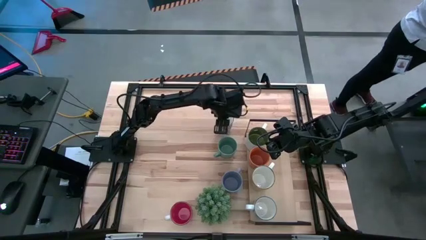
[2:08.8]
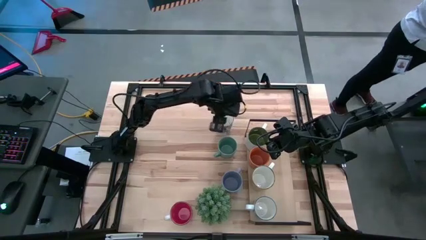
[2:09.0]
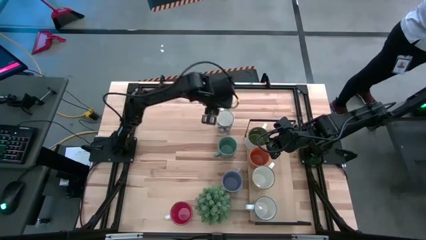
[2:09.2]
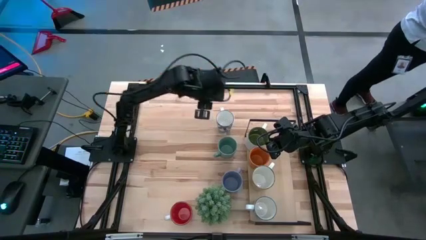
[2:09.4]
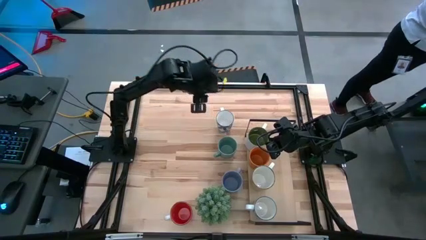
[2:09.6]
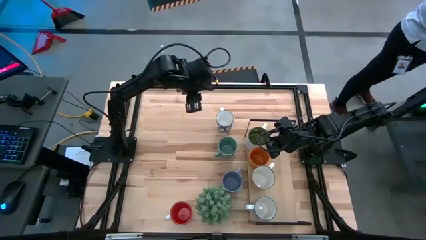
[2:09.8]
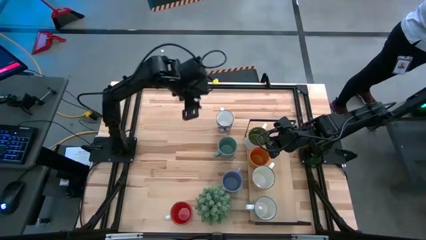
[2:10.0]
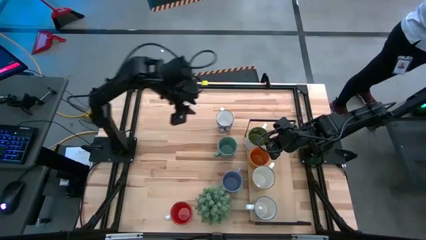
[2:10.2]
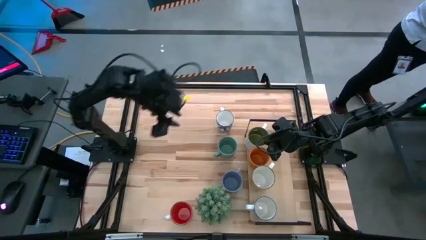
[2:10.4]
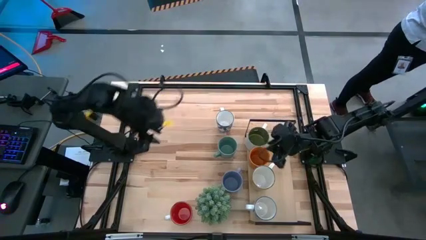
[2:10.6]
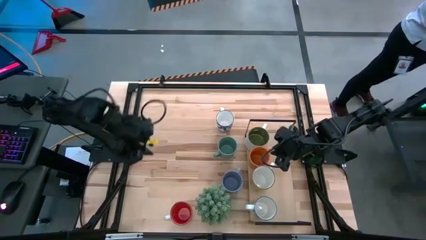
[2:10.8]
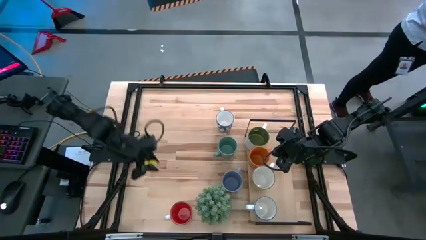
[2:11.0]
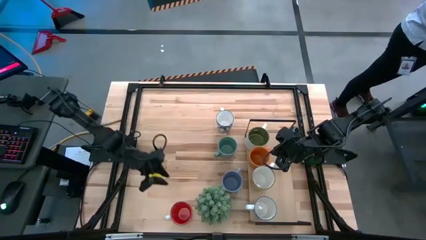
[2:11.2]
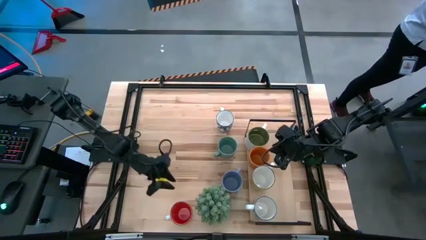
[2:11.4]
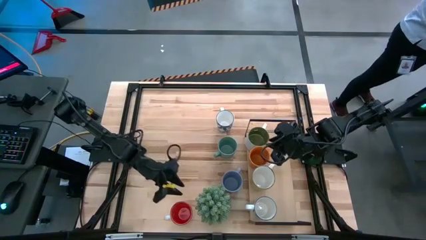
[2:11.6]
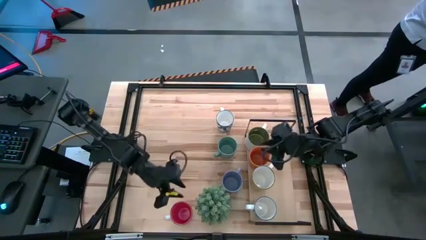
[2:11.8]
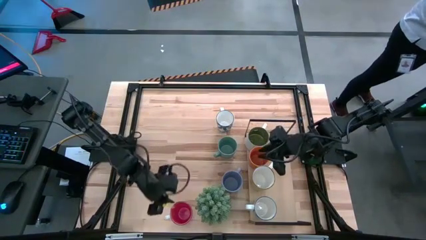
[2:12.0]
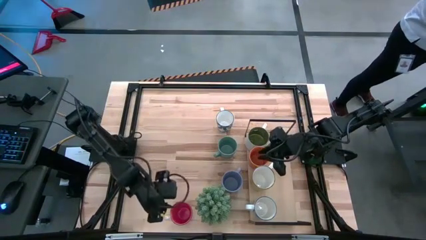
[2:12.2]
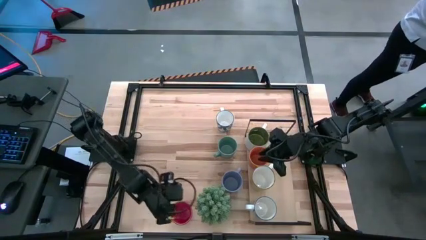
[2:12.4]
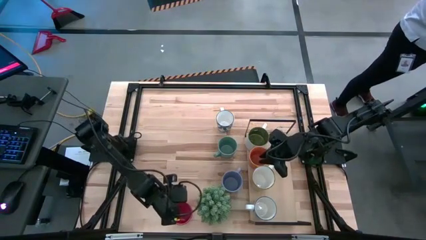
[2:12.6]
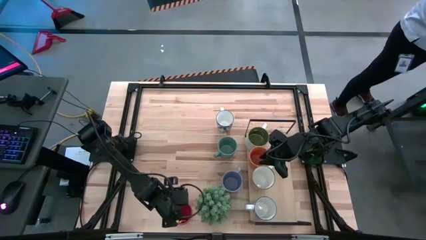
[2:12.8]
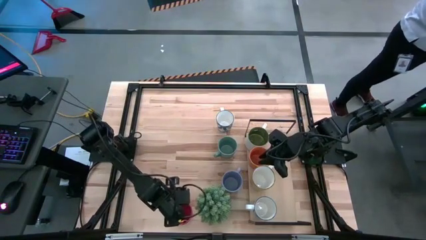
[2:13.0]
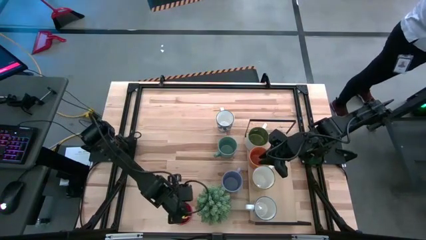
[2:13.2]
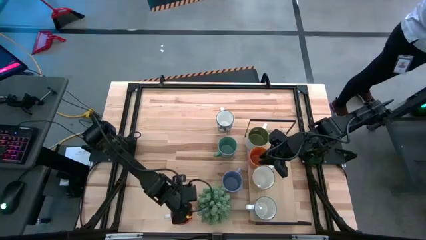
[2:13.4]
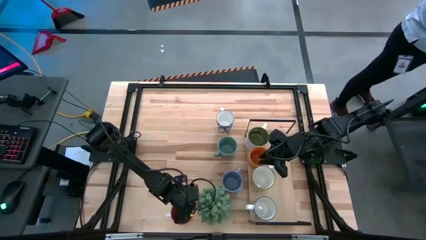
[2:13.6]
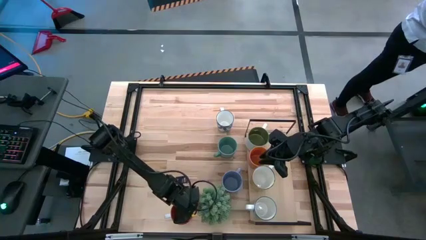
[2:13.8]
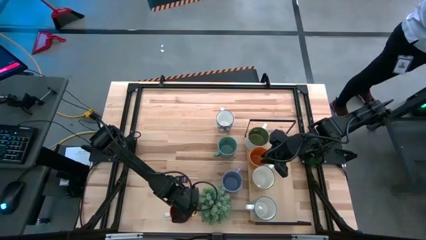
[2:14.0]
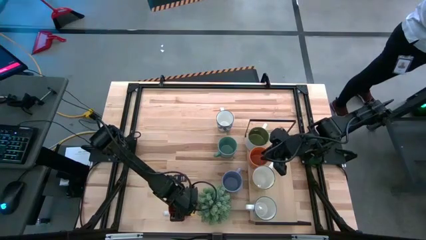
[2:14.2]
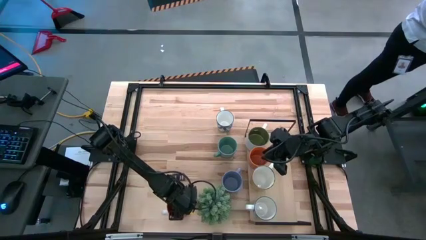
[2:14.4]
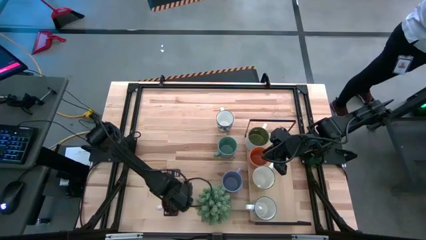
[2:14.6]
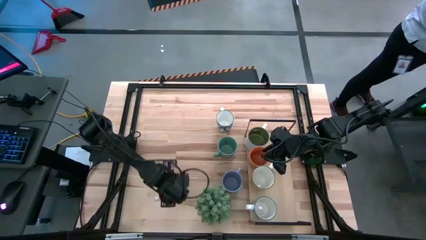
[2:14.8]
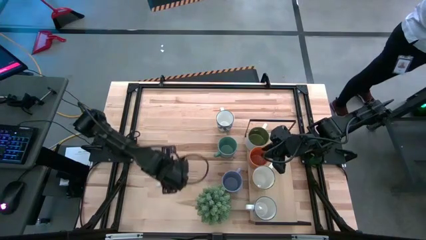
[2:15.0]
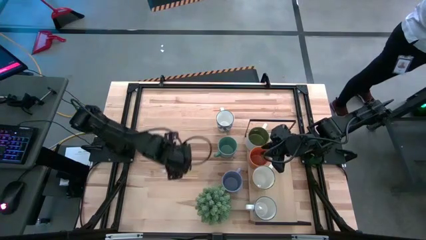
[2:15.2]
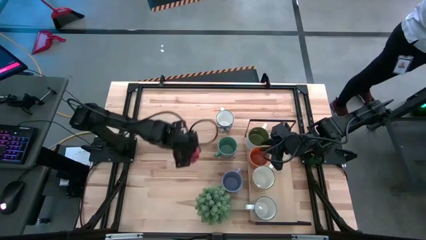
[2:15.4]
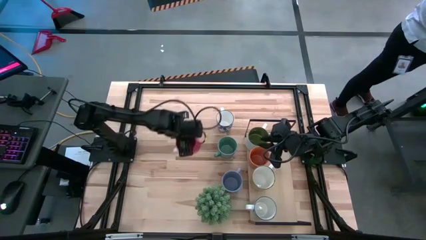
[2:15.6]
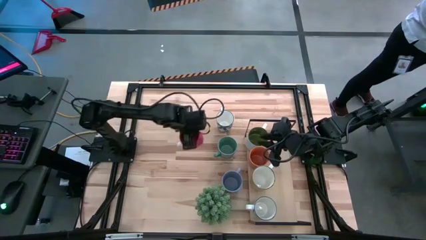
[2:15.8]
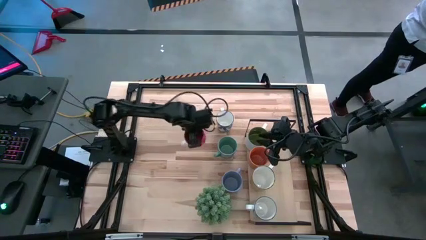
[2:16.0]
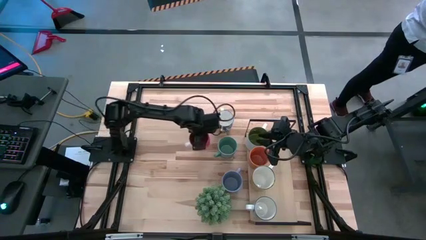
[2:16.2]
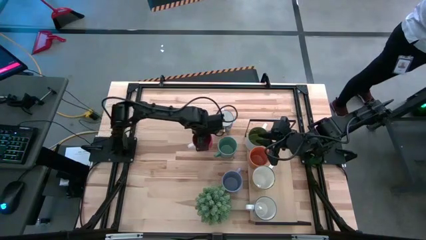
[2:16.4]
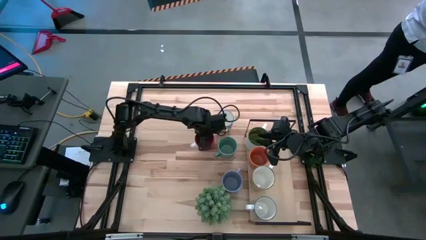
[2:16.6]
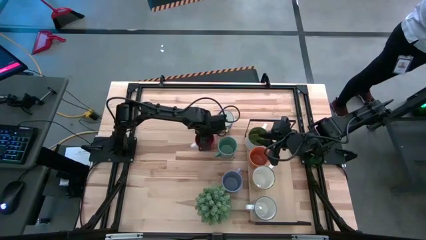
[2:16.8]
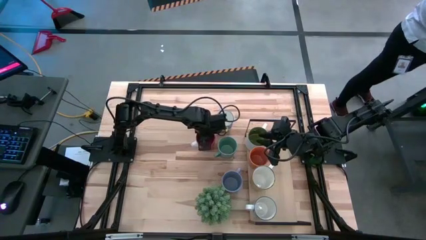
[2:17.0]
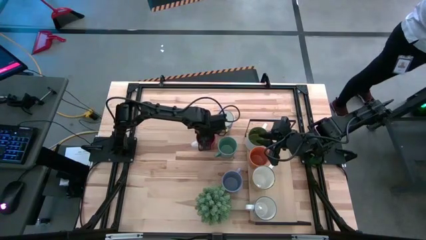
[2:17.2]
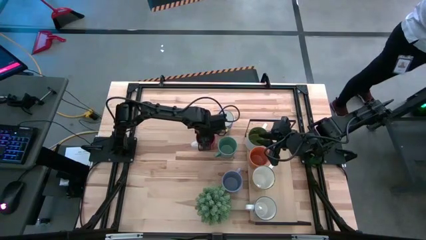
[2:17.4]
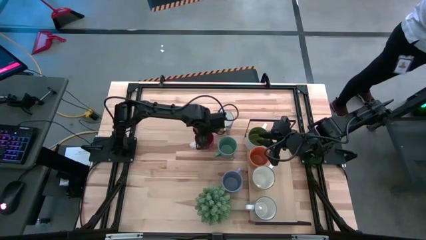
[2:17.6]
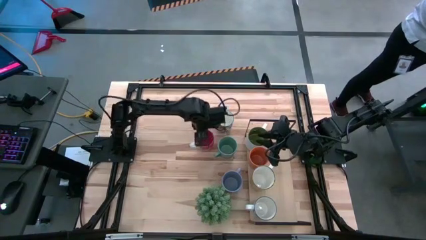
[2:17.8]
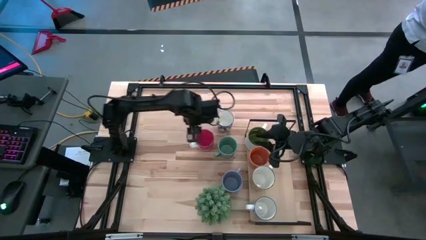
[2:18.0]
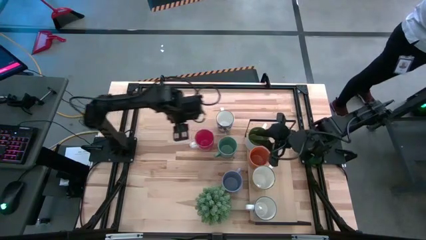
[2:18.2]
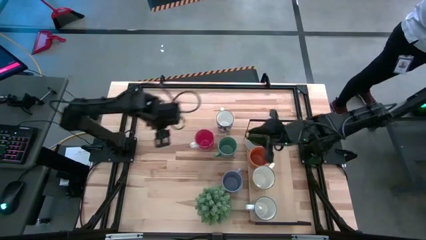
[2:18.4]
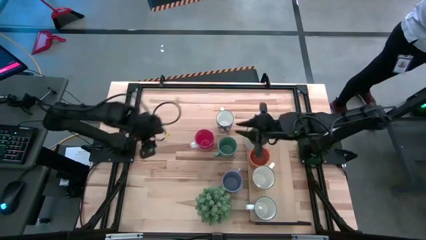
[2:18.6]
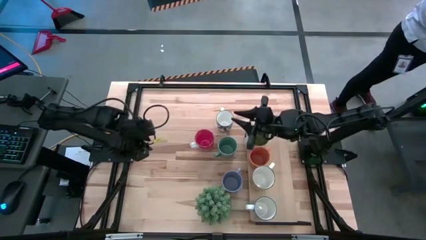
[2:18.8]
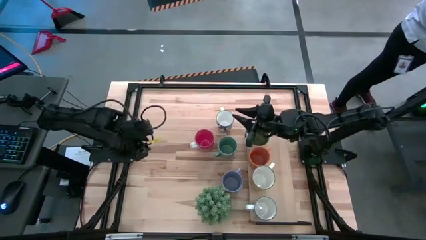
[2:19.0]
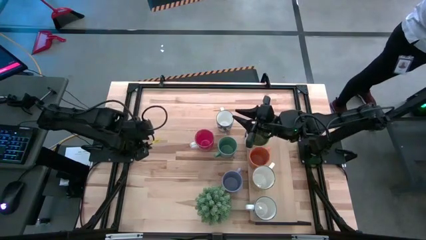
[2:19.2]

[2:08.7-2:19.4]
Task: Place coffee mugs
Put the red mug on the shelf

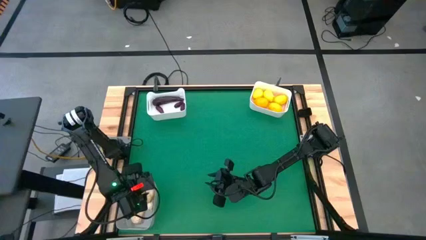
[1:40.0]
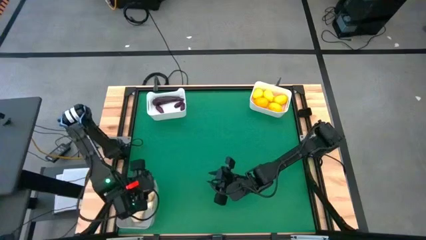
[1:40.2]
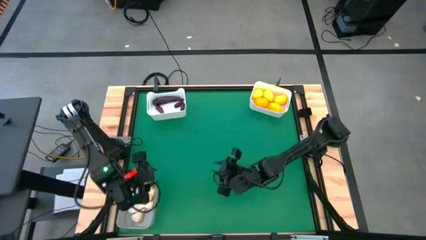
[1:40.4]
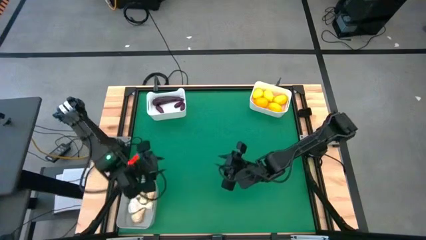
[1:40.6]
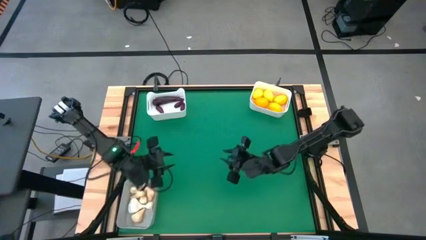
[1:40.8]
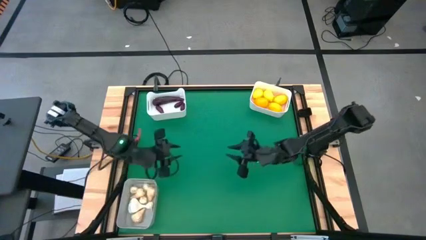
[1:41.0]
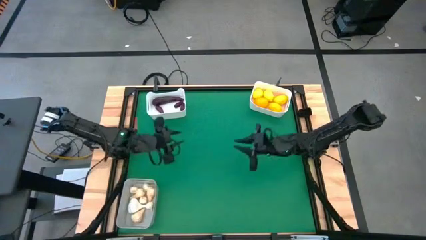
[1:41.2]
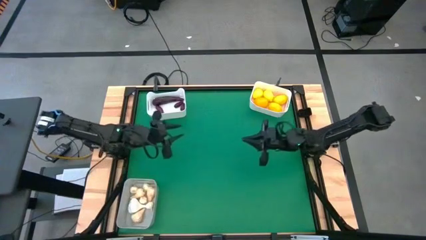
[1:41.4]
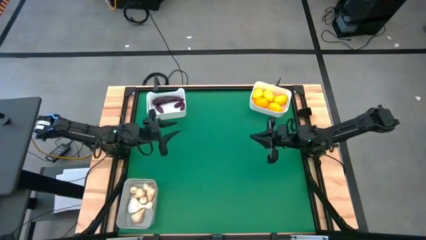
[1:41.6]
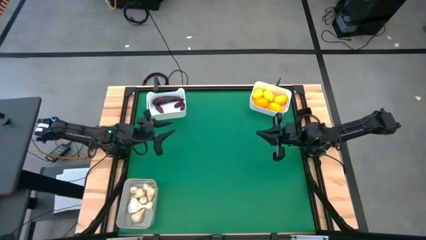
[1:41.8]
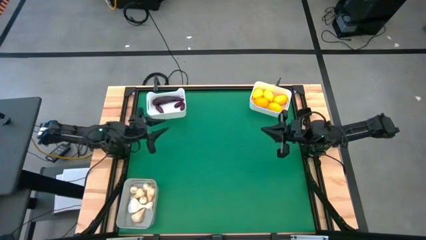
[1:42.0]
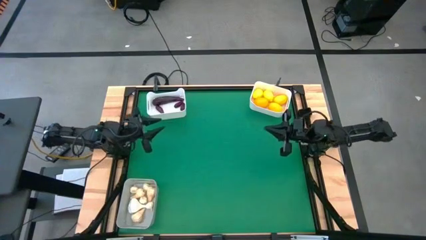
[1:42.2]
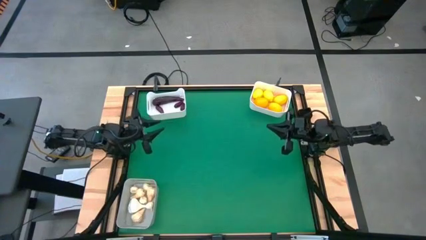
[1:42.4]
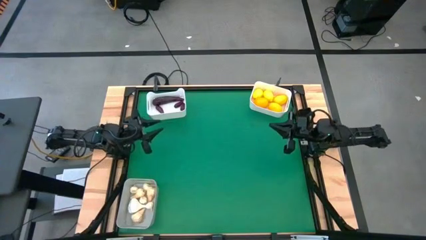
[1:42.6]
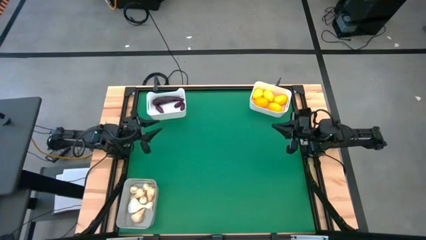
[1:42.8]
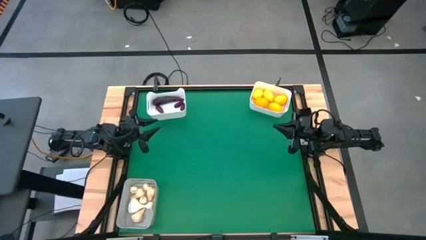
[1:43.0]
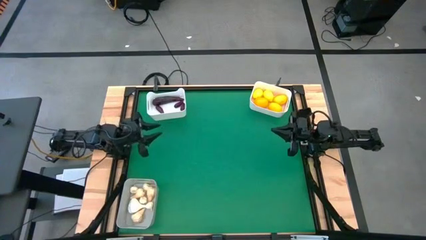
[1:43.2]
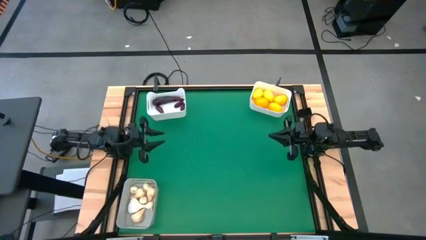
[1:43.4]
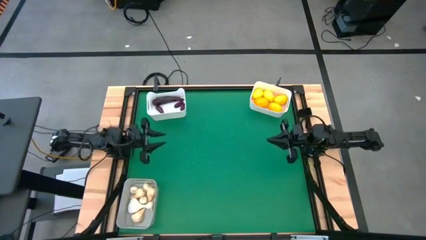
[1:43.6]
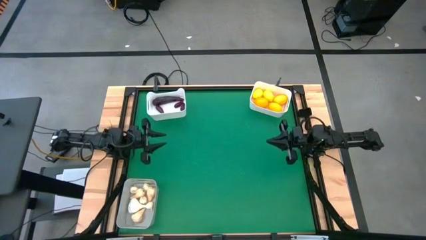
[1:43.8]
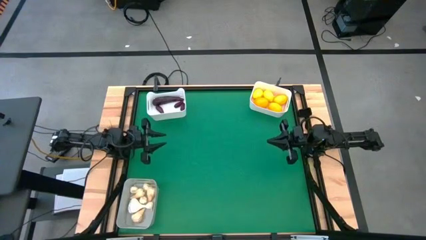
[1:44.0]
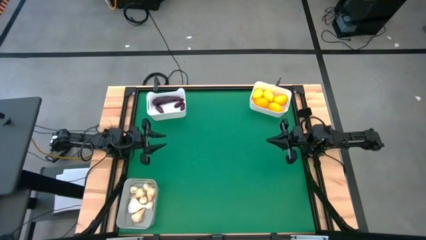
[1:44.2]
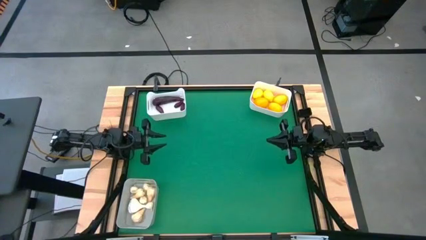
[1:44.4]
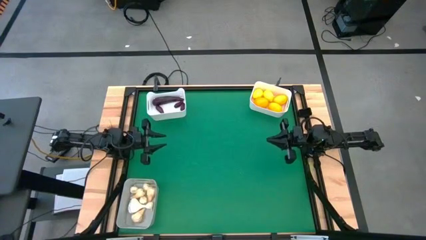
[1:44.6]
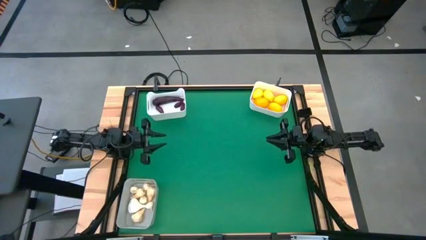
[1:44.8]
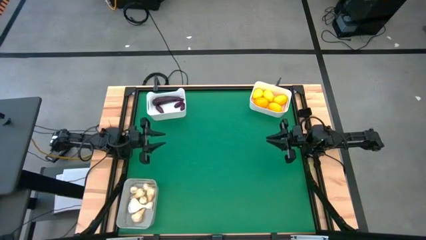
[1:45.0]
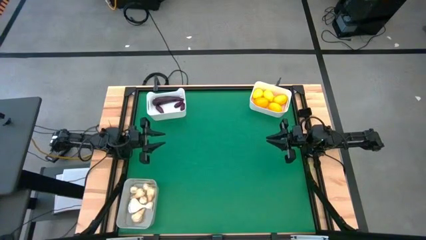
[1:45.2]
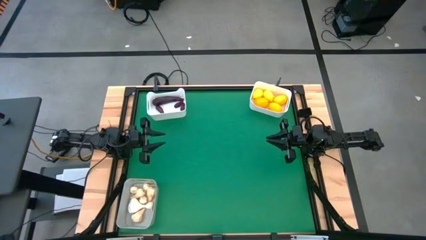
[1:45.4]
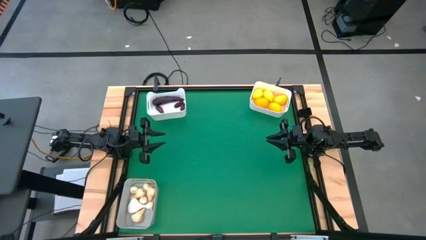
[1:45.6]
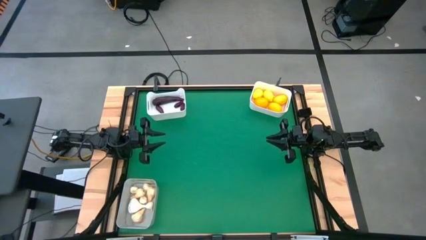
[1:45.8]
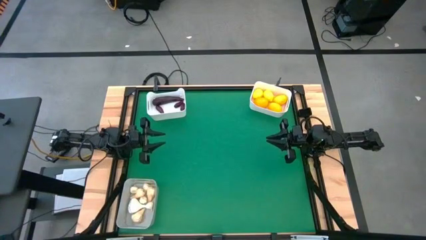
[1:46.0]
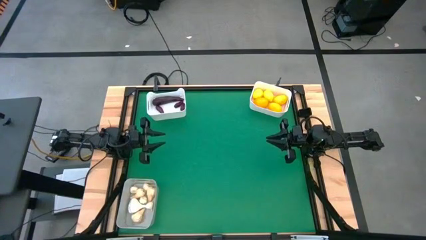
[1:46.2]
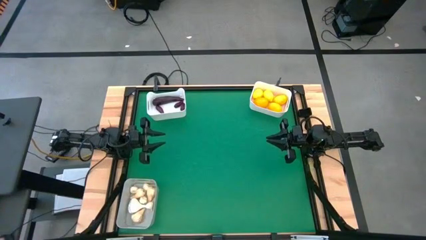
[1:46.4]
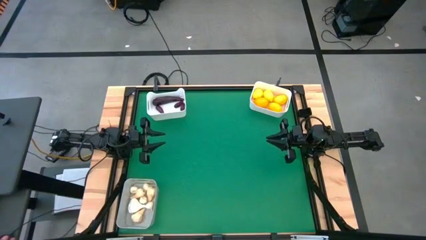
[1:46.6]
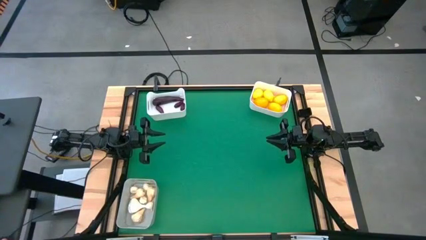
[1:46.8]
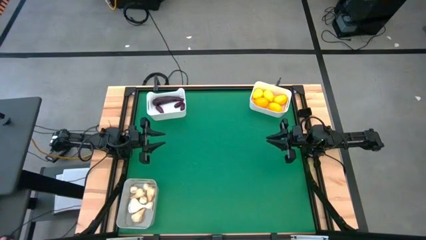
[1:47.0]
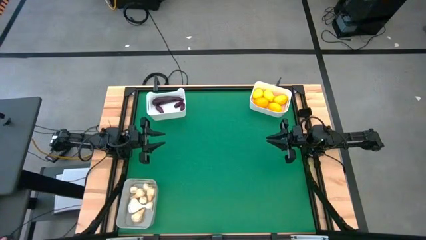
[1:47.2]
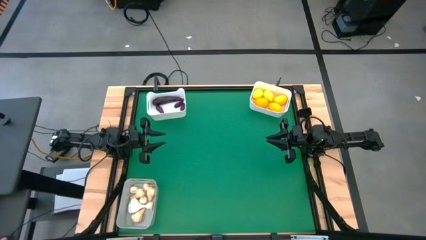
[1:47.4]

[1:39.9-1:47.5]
Task: Sort produce into baskets
Return to Home Position
